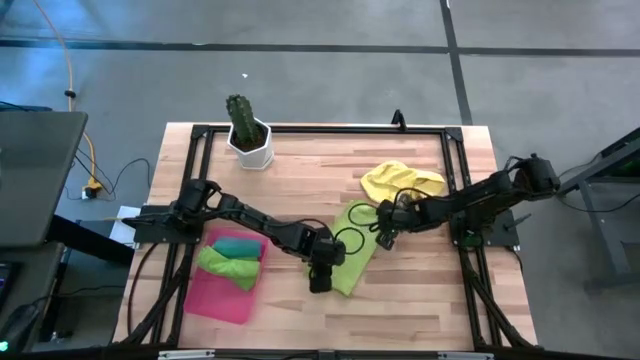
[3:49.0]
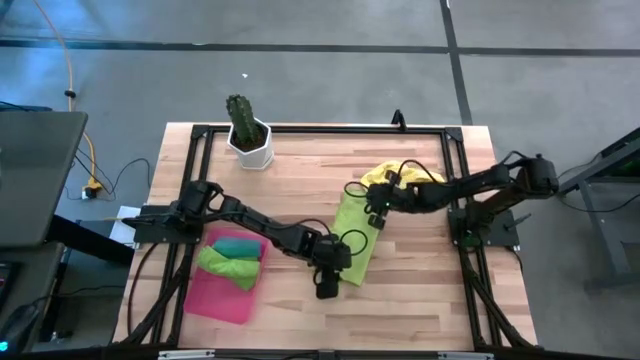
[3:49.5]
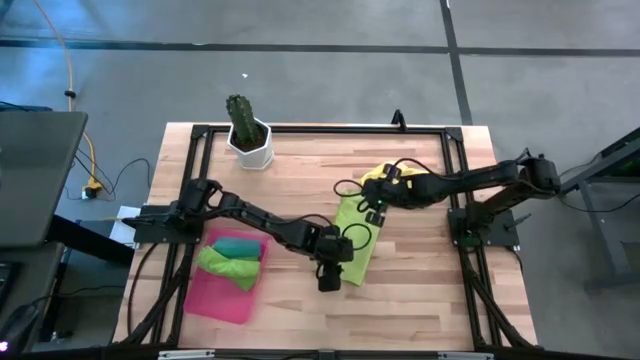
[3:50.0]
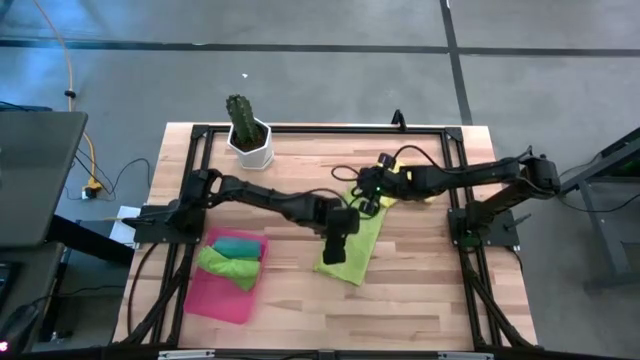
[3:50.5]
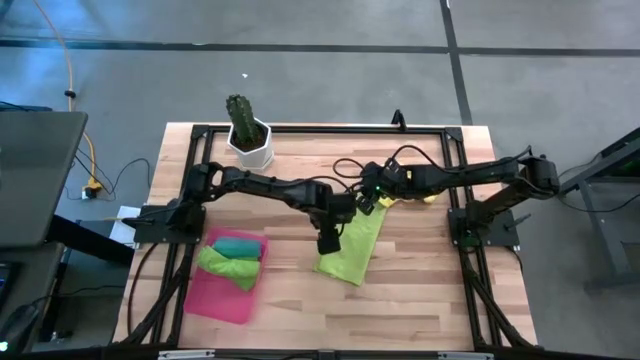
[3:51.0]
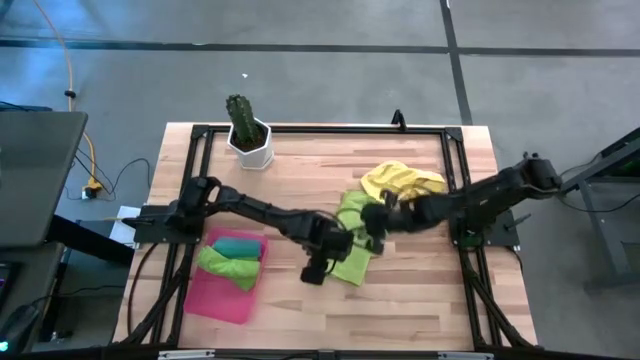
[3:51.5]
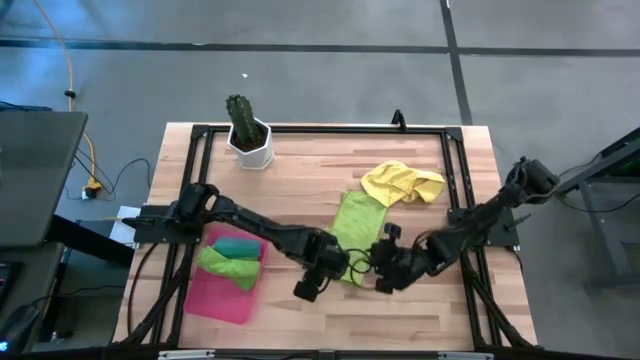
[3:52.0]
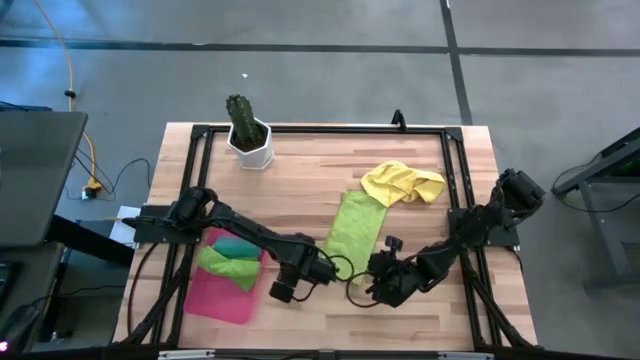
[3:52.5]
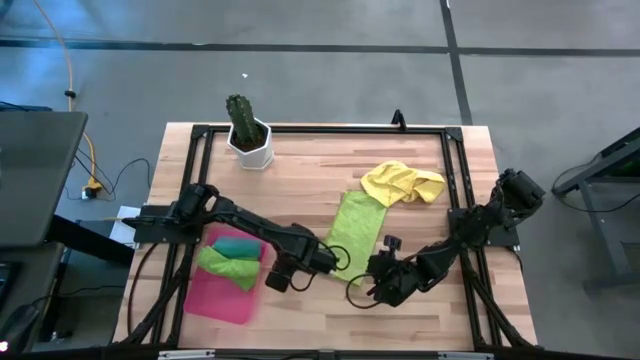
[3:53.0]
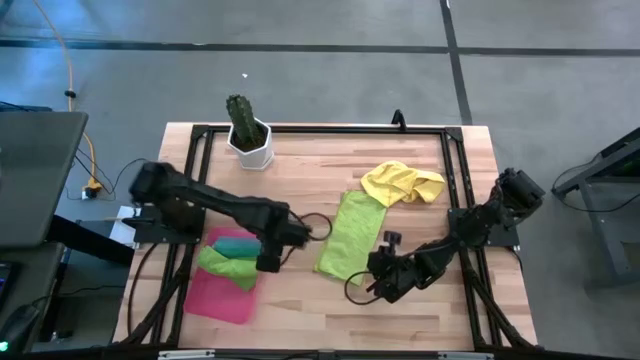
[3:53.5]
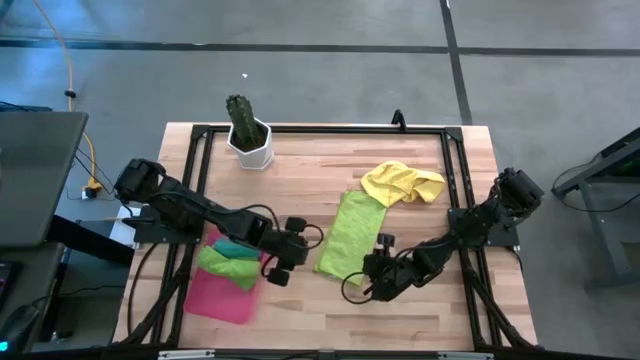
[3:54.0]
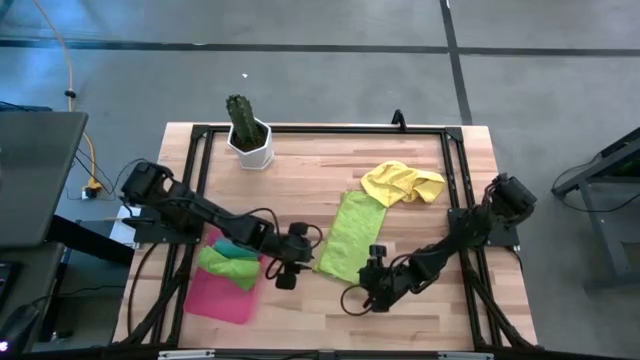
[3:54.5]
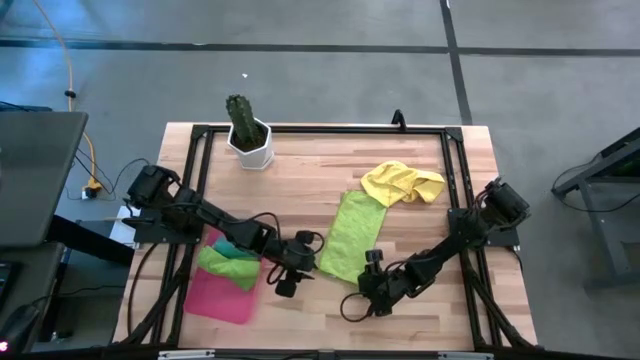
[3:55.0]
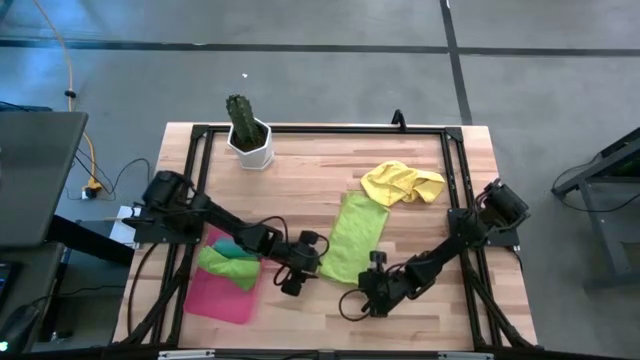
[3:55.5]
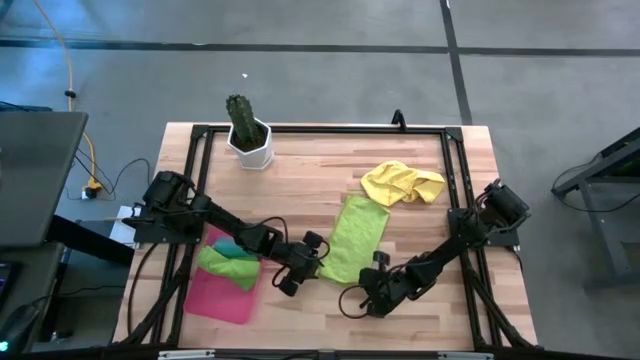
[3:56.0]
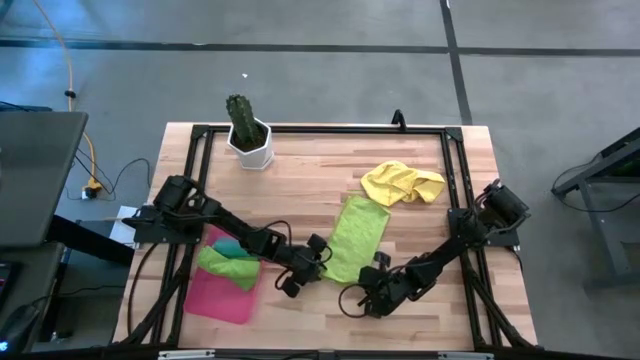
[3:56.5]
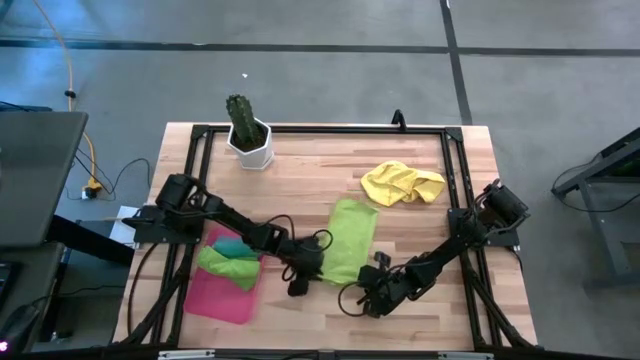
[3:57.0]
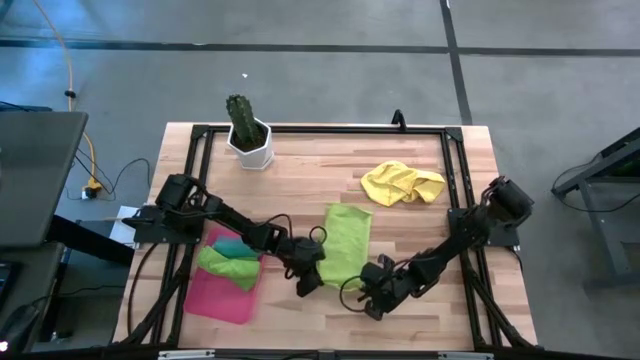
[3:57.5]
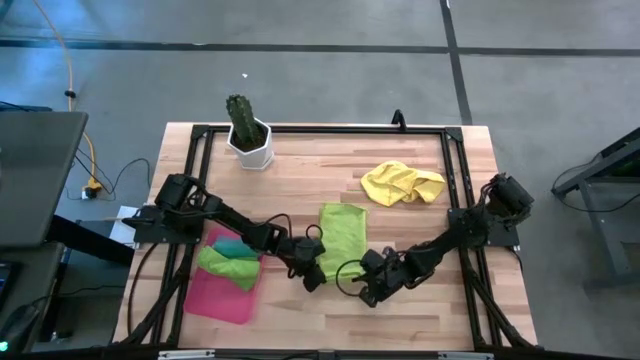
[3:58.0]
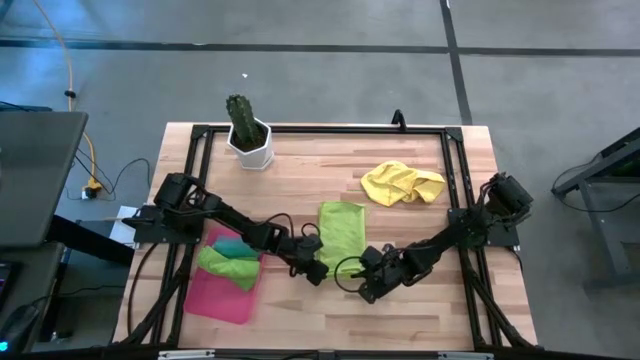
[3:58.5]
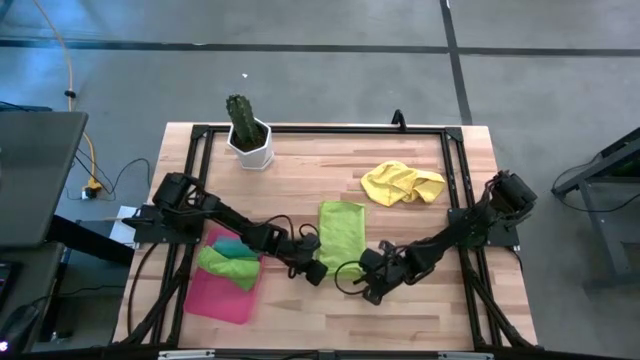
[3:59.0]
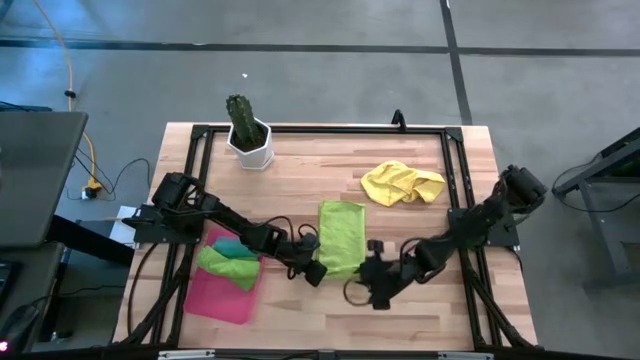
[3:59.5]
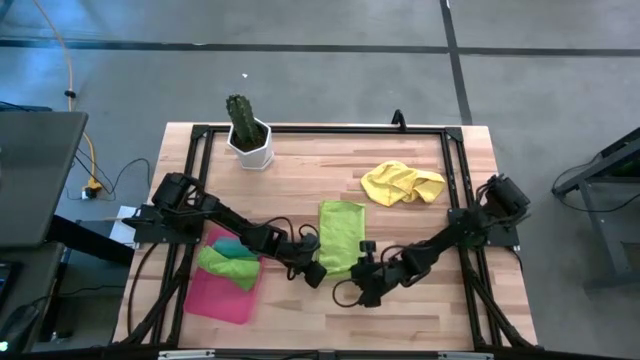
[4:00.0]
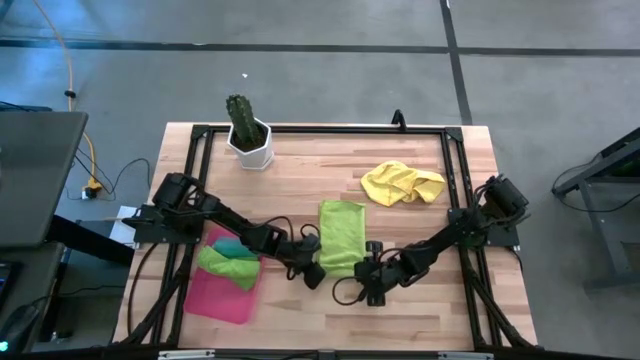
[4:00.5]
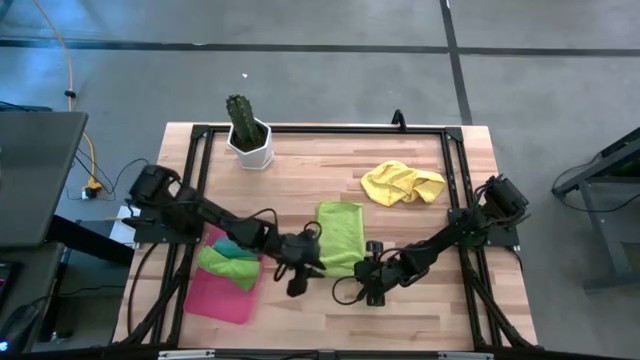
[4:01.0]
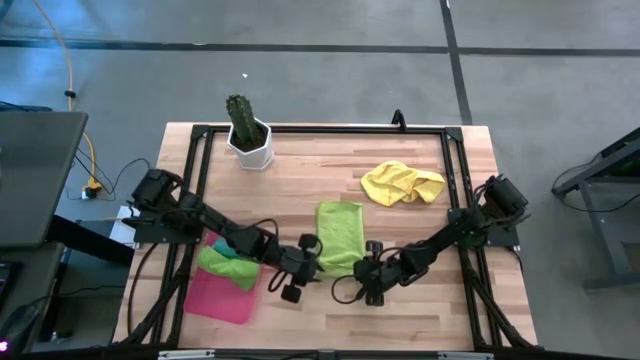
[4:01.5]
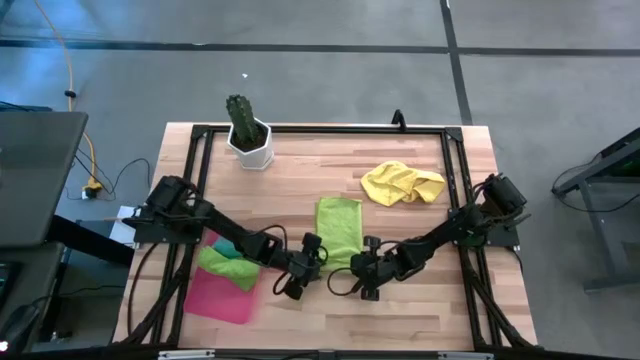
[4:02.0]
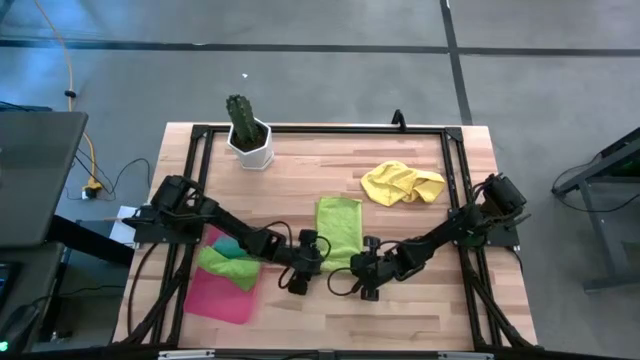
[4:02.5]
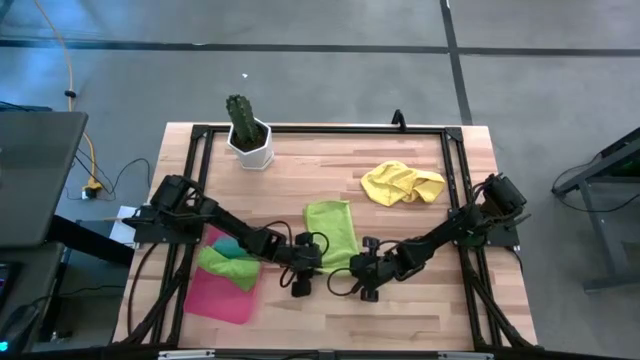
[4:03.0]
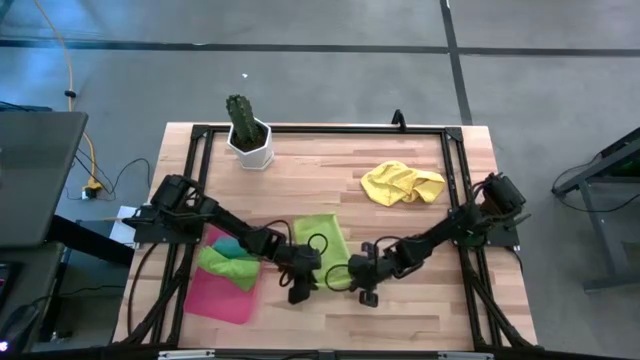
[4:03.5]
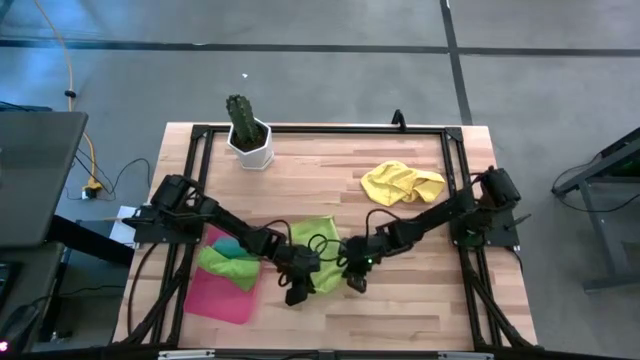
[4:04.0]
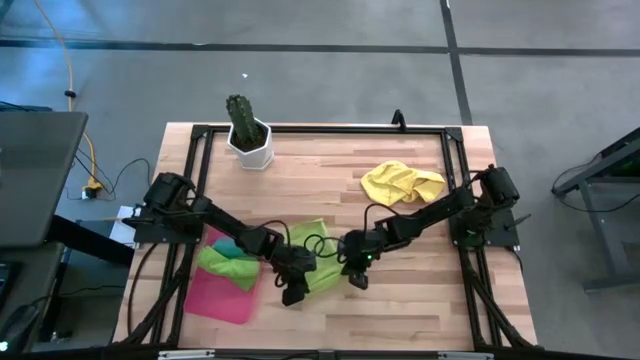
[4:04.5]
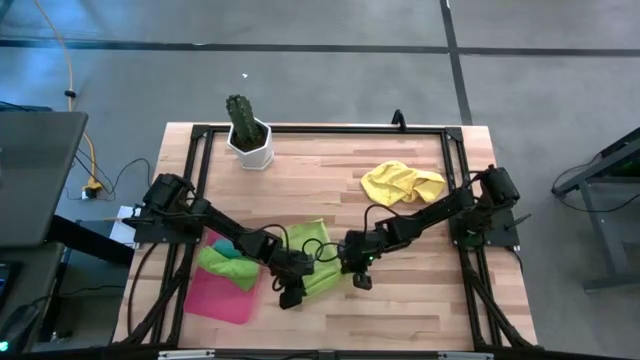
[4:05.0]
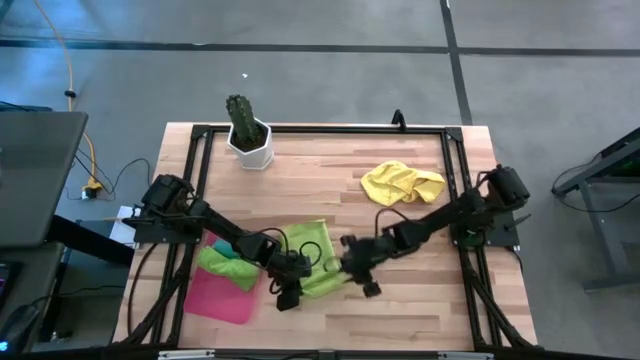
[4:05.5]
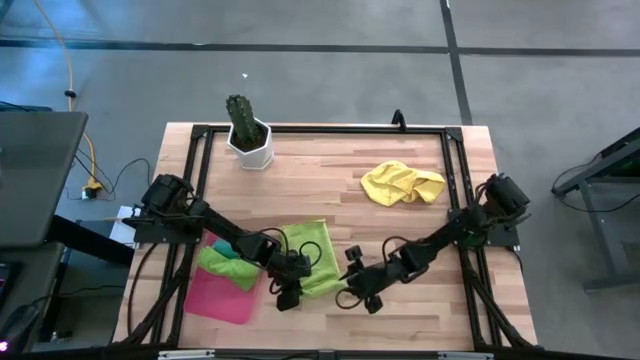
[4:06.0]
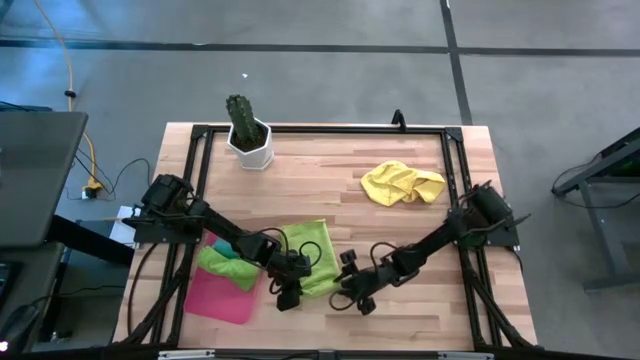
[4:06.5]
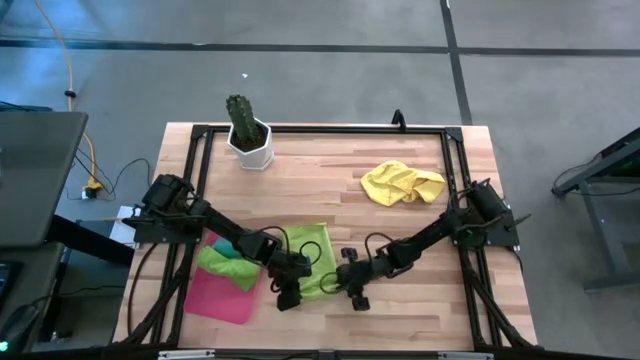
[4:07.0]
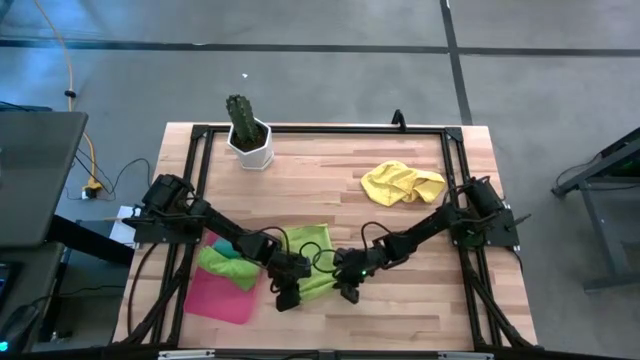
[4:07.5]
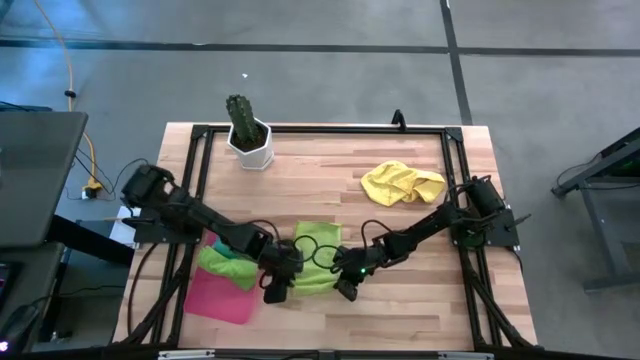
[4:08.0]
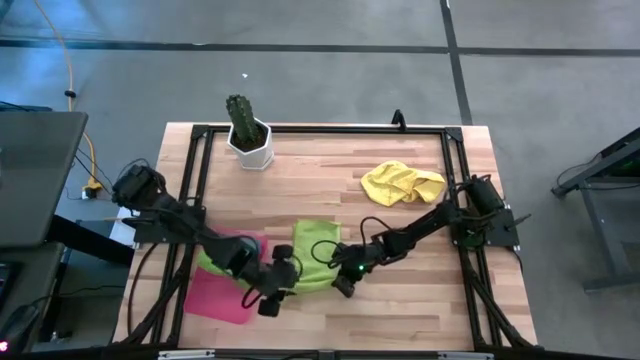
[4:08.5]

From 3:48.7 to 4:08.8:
Task: Roll microfiber towels into tight, uniform cylinder then place into a basket
Roll the light green towel
